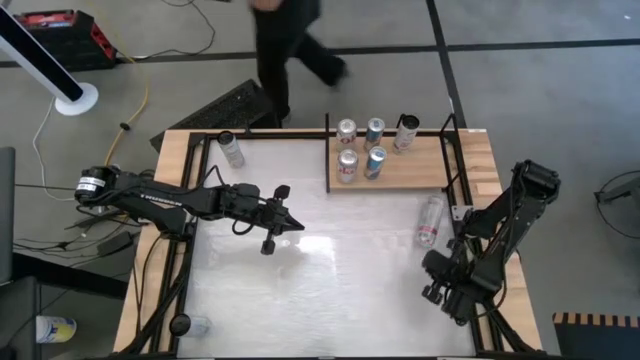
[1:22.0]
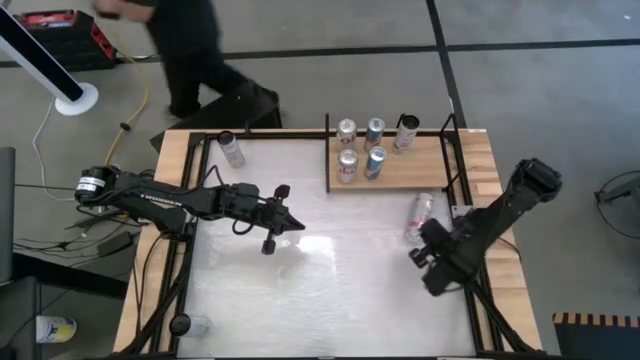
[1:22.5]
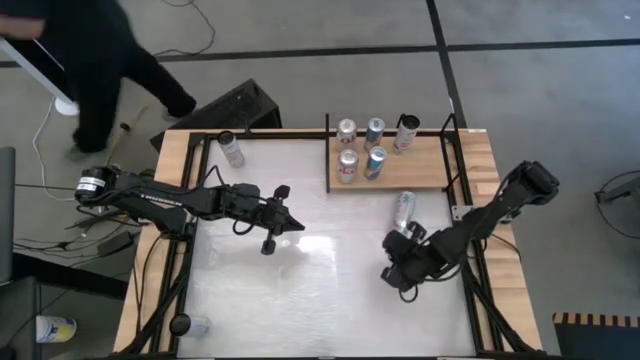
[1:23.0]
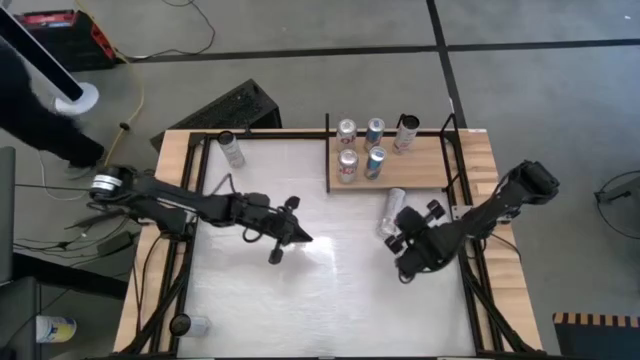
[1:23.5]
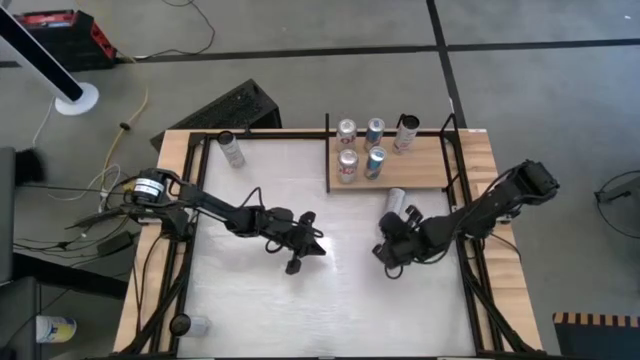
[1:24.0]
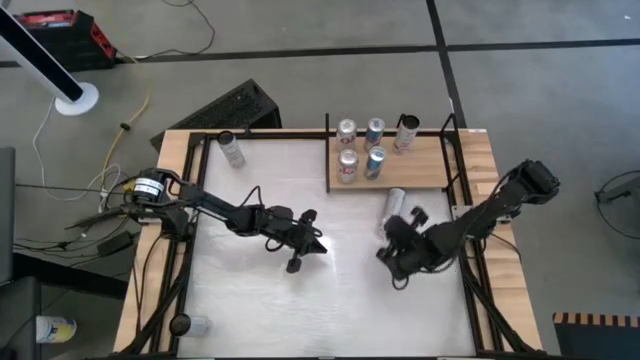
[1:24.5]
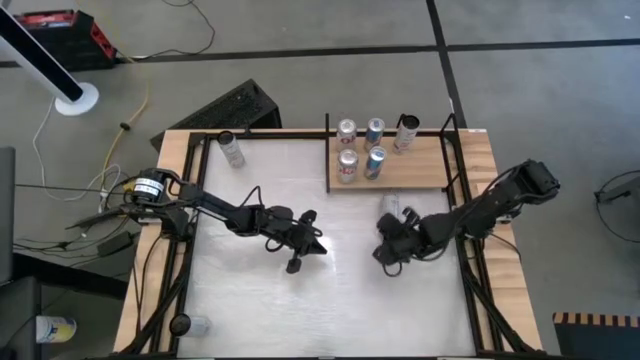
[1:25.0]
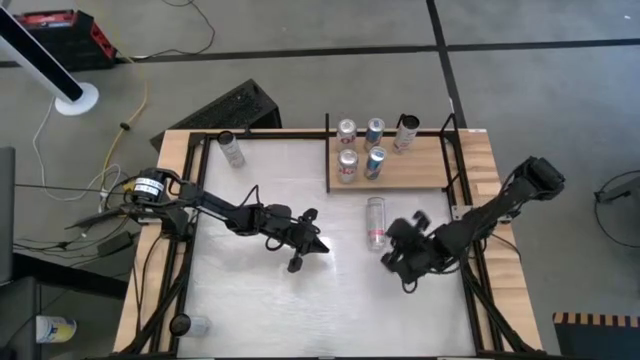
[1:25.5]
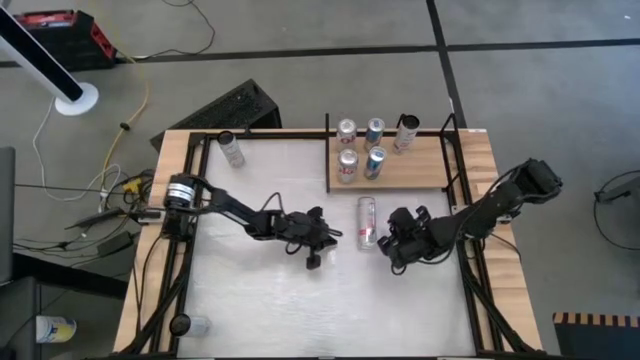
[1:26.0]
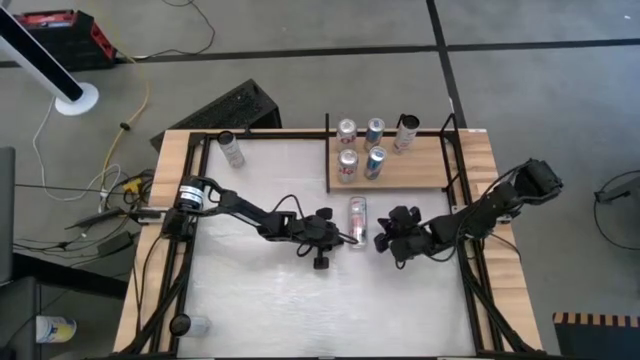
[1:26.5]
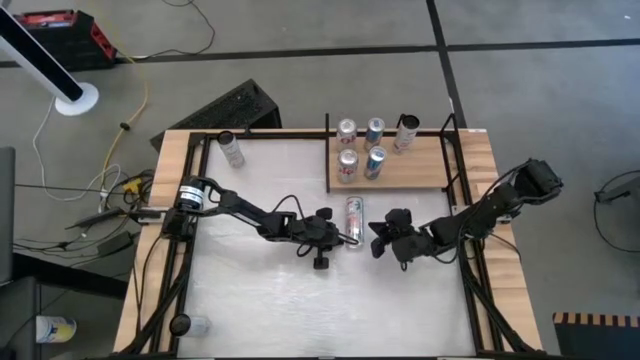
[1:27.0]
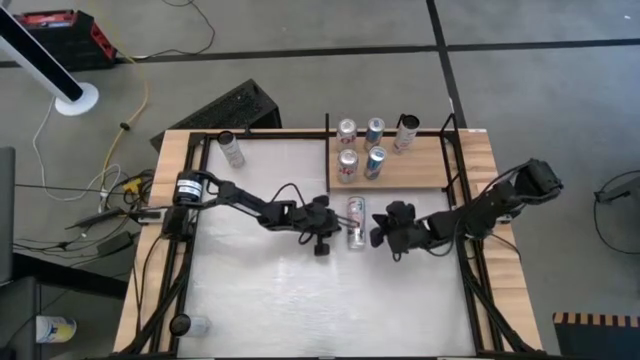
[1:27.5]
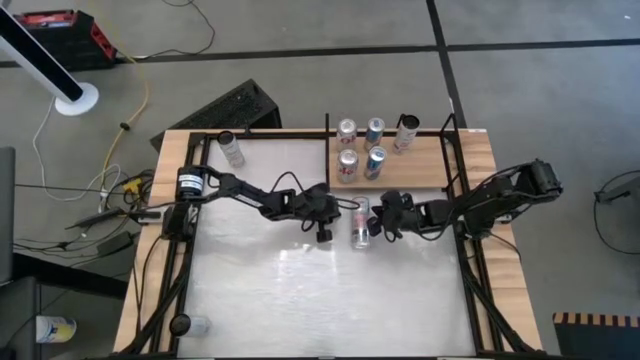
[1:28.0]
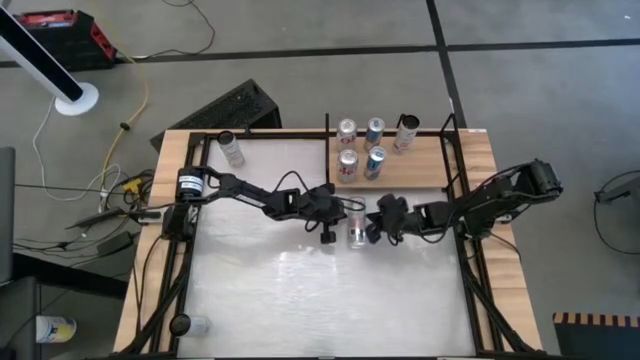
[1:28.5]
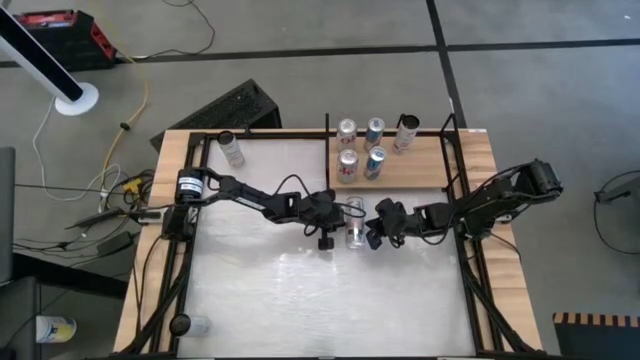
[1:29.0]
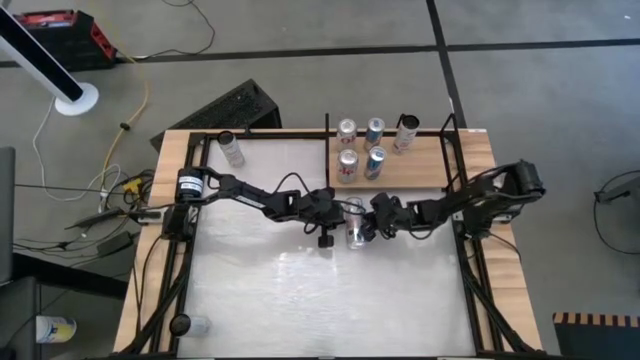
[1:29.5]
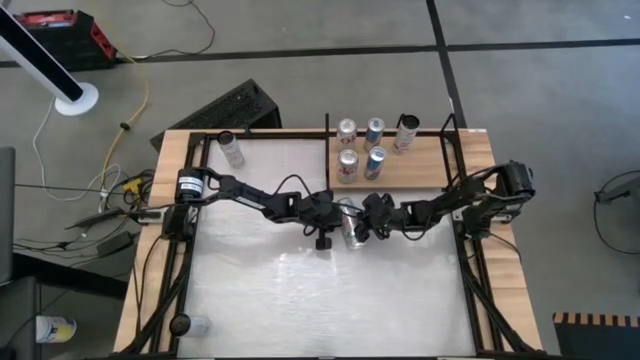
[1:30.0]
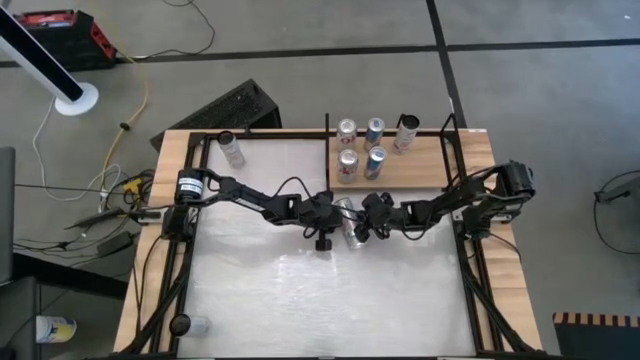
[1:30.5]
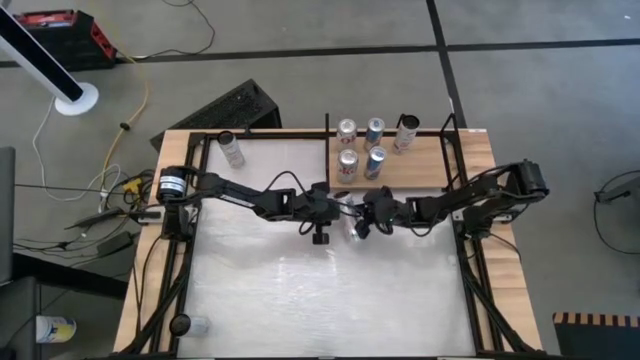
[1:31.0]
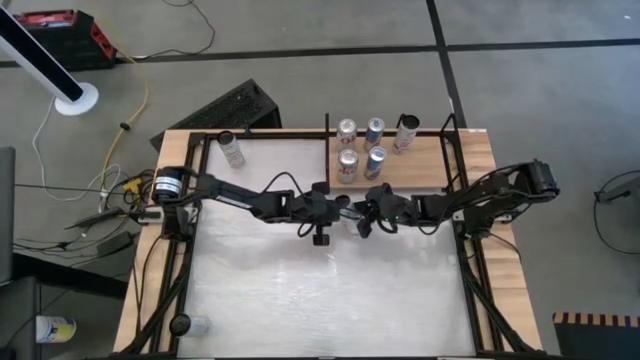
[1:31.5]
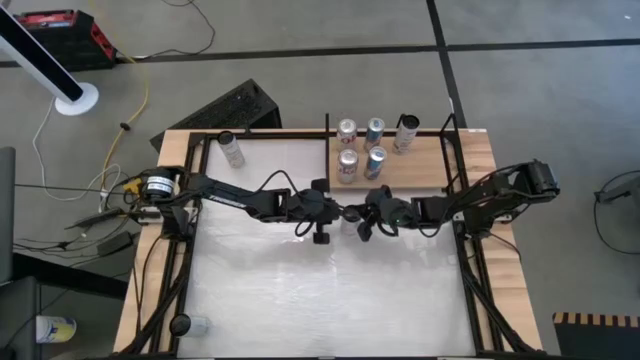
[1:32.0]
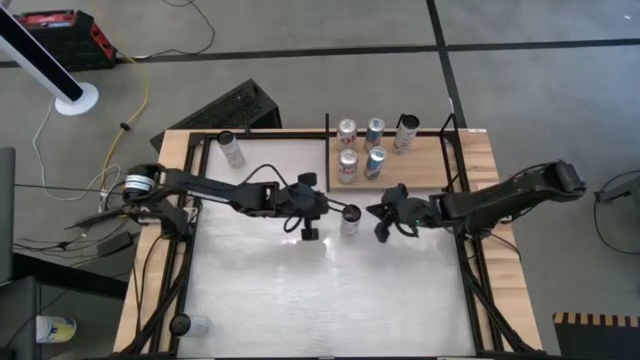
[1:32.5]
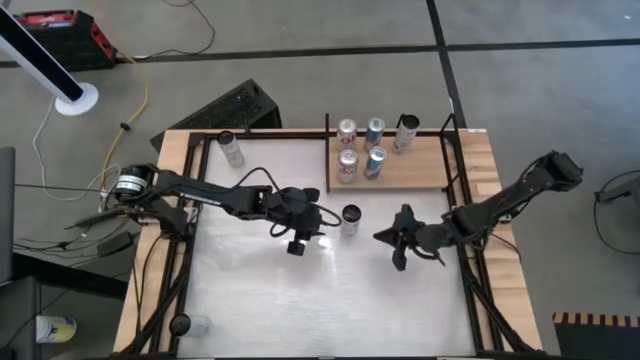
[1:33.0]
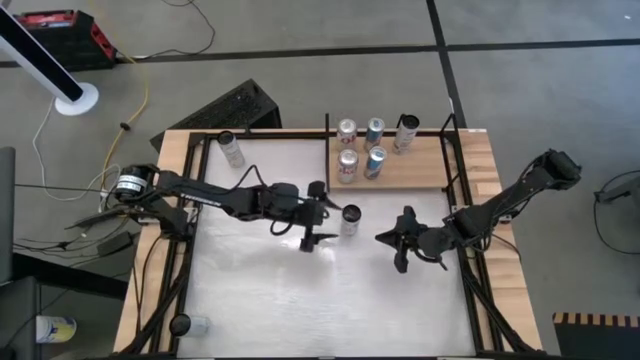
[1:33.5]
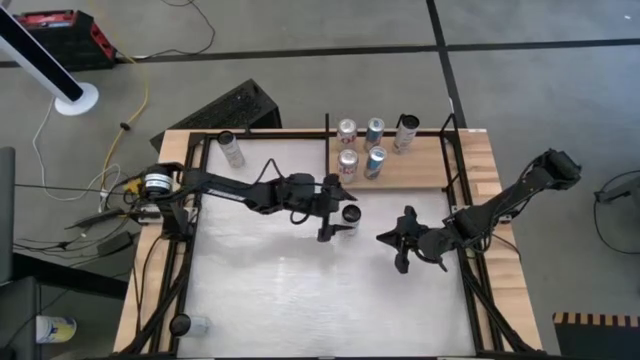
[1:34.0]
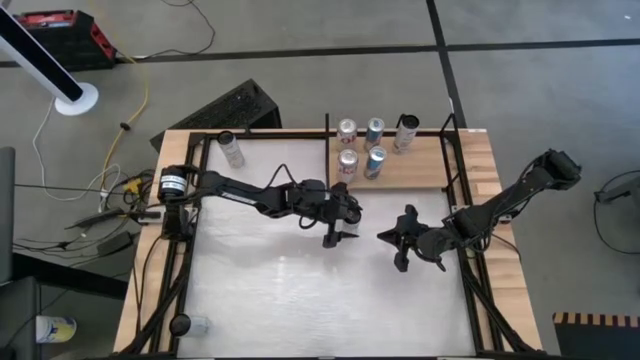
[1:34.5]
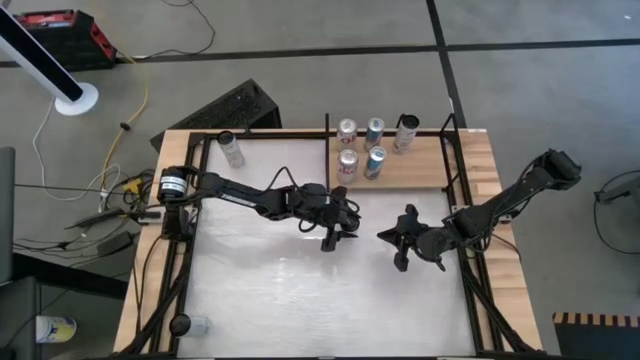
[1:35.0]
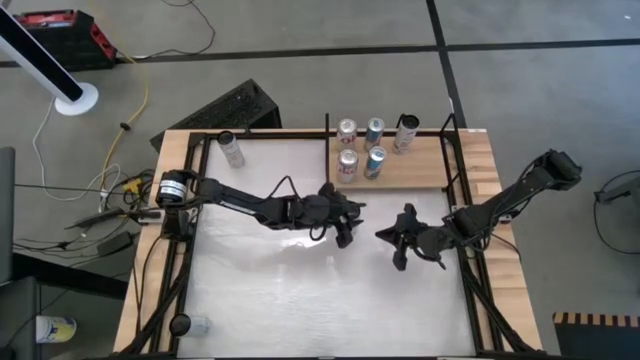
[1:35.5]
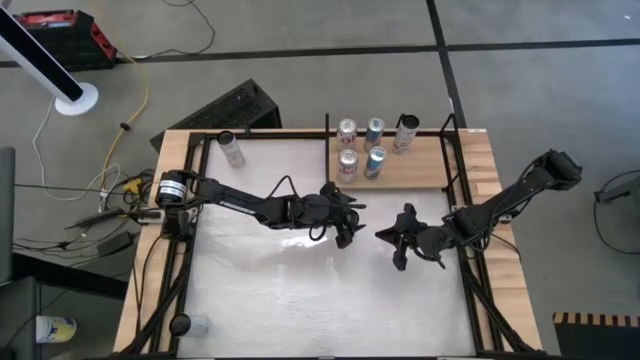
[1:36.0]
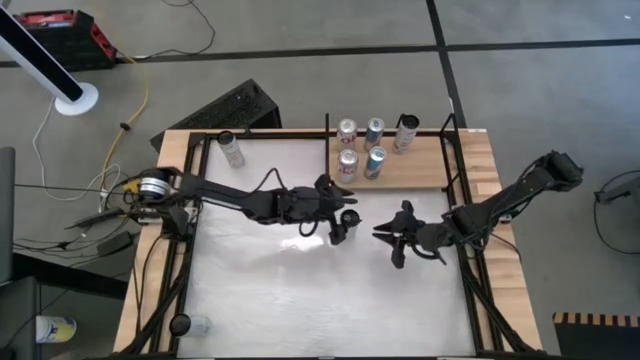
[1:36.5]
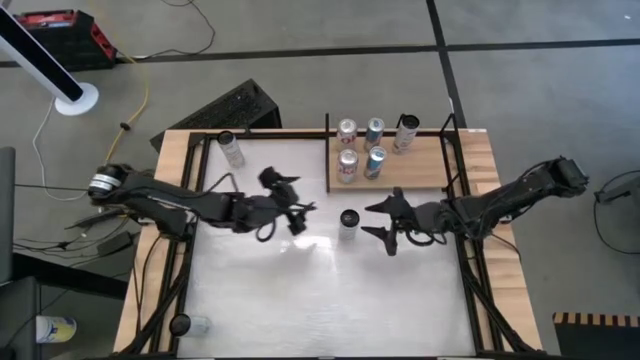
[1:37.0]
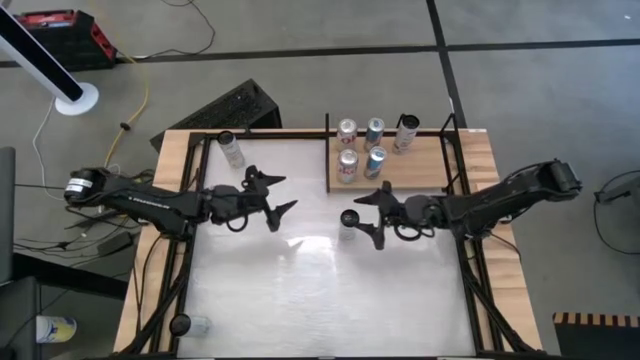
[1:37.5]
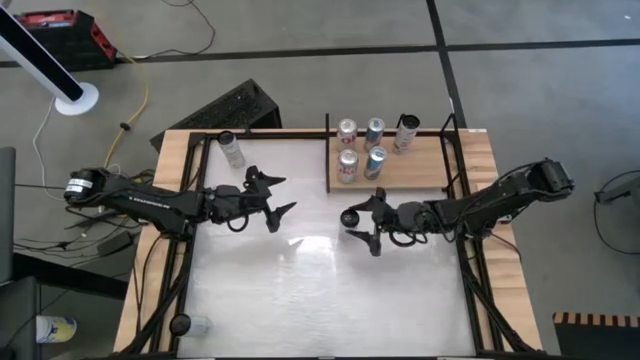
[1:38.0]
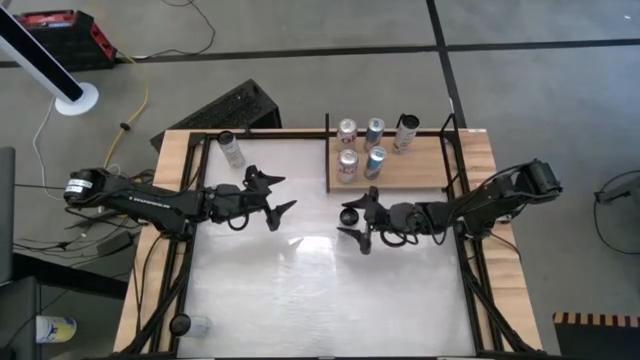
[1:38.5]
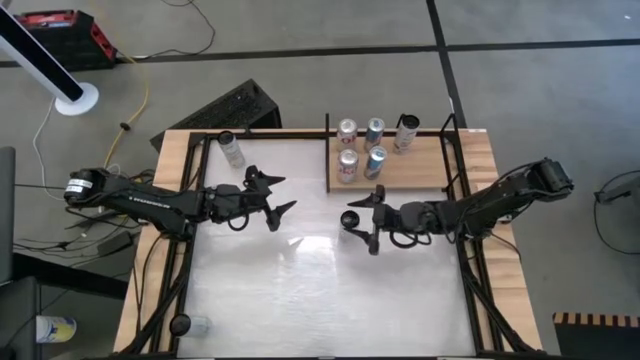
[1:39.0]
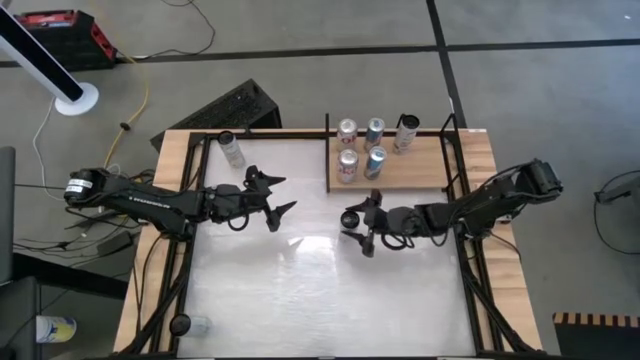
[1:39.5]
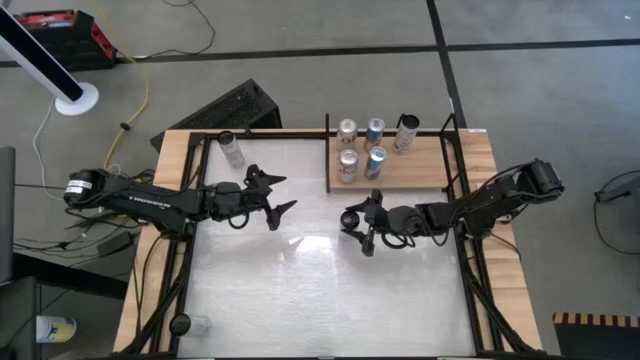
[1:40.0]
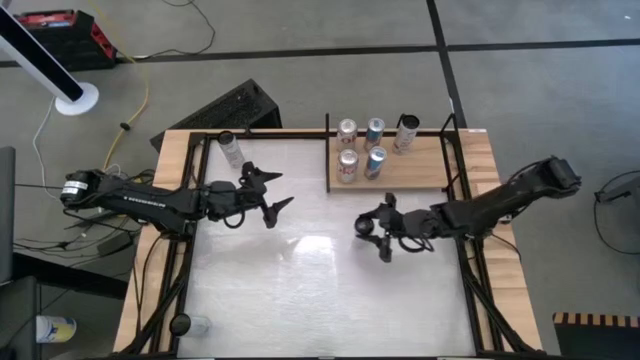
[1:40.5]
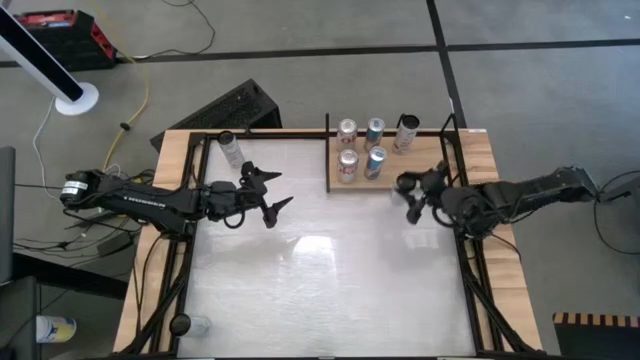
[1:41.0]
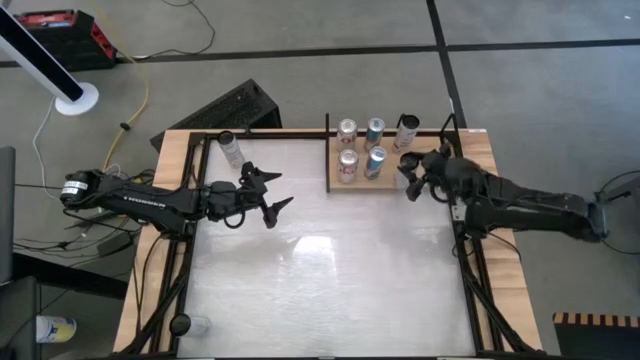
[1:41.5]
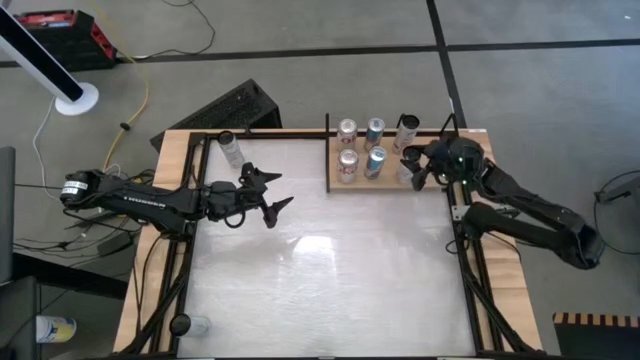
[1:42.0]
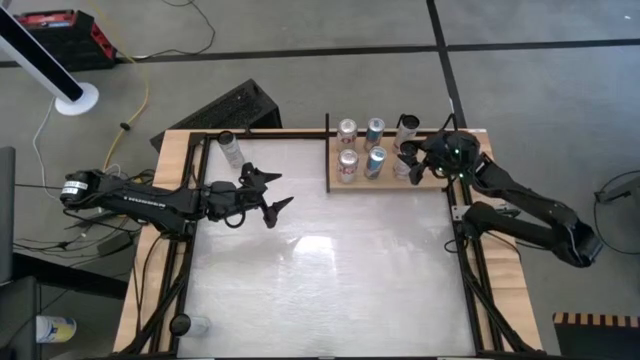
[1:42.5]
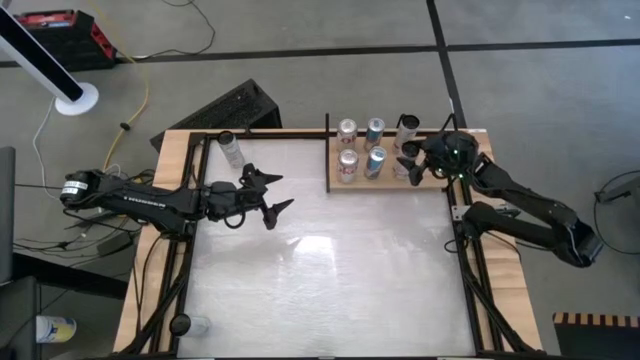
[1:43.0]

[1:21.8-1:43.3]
Task: Place canned beverage on shelf
Put the white-pink soda can aligned with the other white-pink soda can on the shelf
